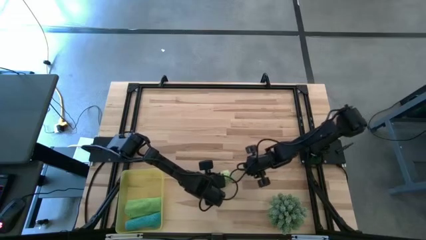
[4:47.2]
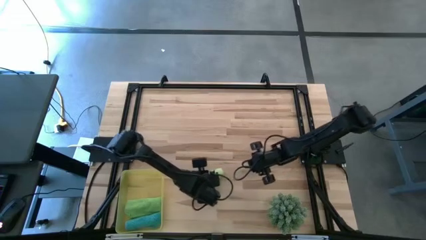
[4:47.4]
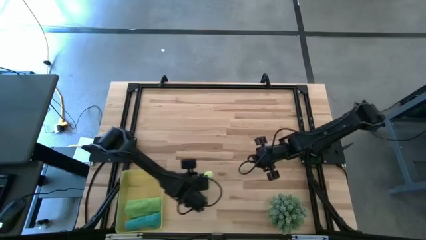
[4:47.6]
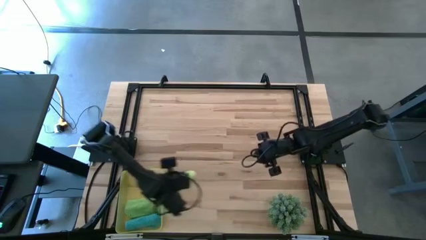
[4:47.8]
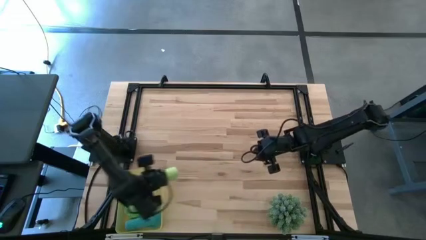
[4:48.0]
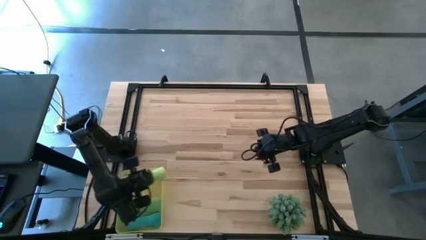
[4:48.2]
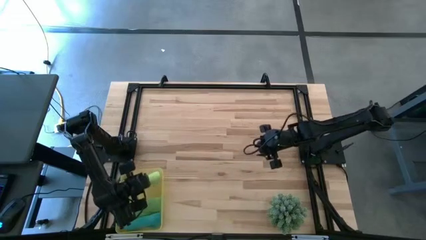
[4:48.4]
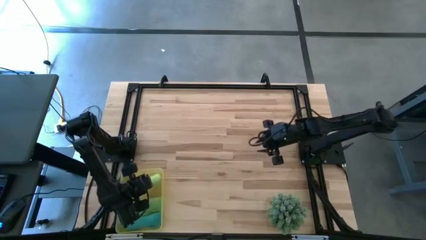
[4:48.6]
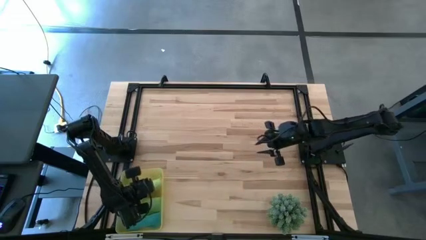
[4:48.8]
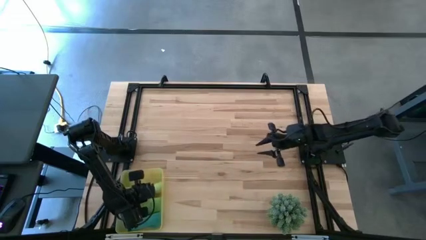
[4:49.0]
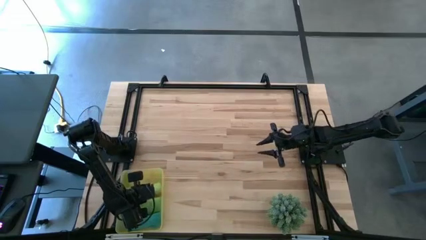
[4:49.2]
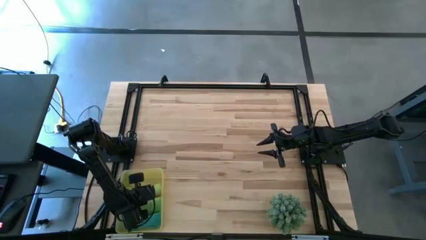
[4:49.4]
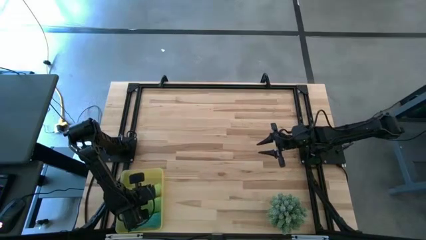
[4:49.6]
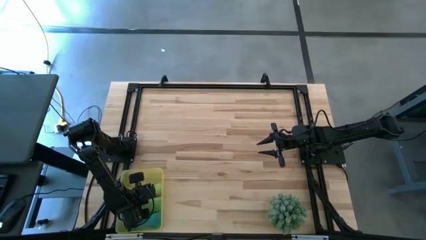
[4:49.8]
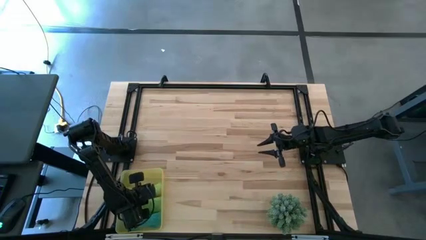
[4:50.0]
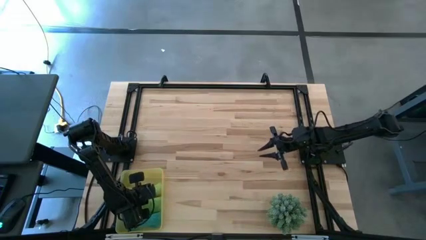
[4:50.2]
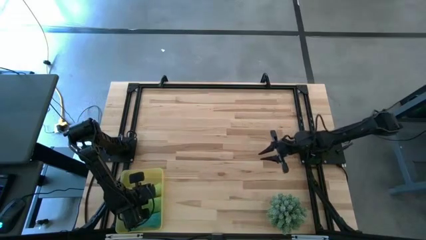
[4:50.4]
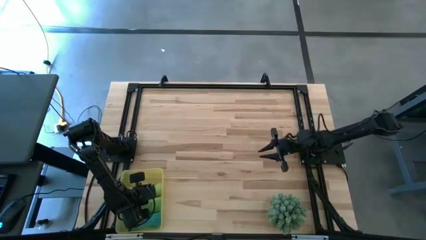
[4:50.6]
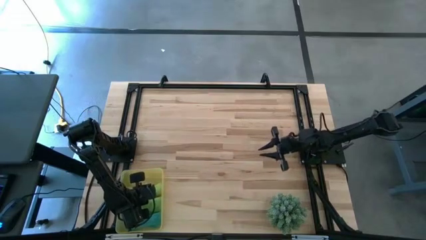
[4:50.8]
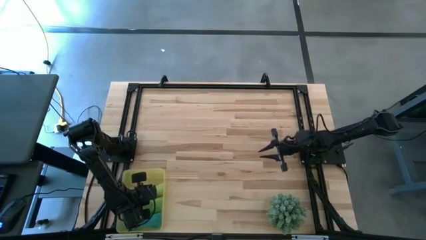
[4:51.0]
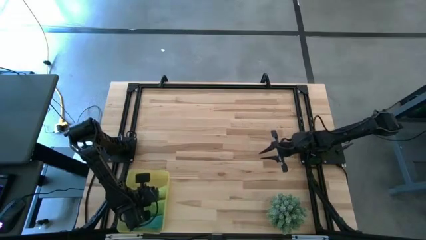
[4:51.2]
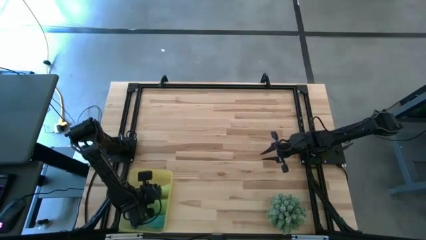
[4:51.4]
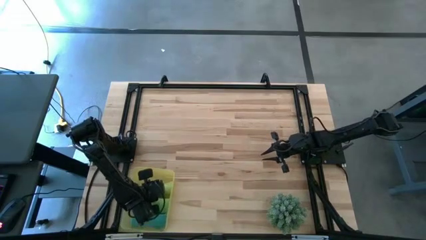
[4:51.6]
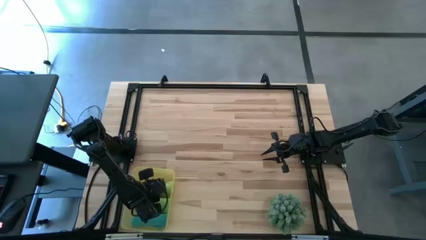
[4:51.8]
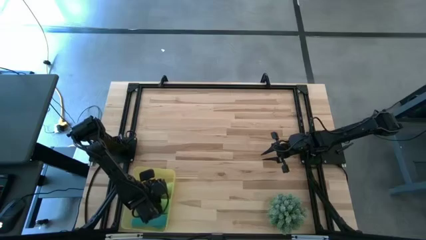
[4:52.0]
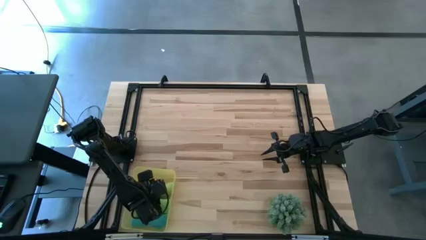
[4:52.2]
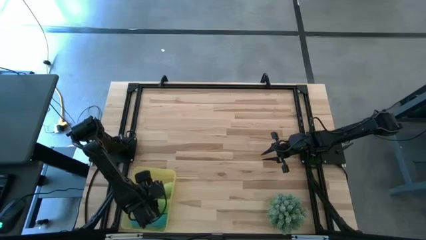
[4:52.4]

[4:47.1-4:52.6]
Task: Roll microfiber towels into tight, uniform cylinder then place into a basket
Put the light green microfiber towel into the yellow bin

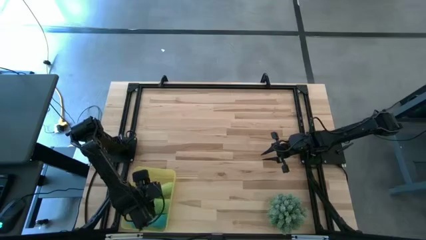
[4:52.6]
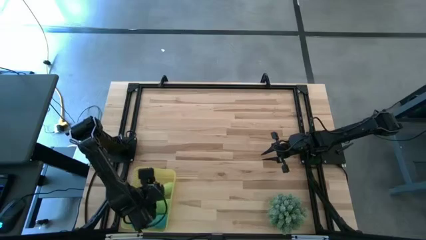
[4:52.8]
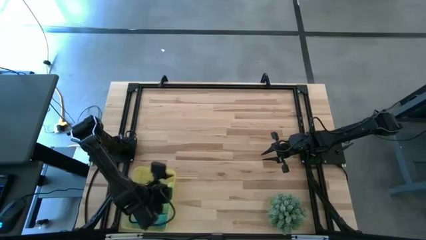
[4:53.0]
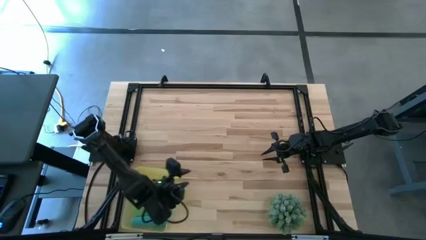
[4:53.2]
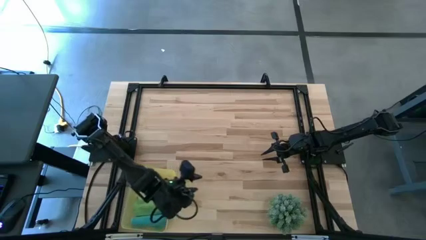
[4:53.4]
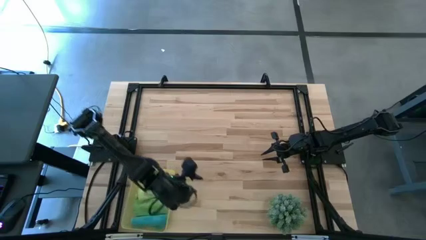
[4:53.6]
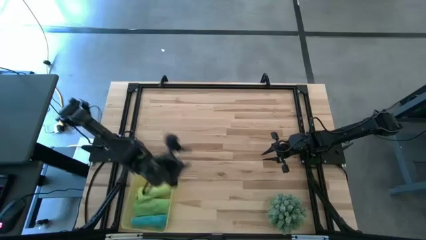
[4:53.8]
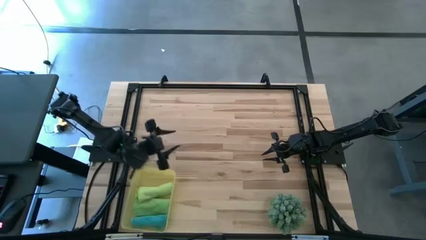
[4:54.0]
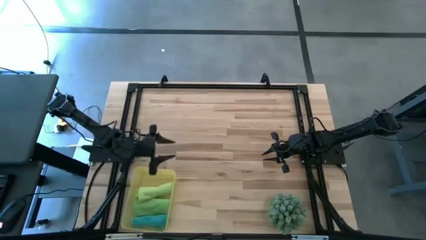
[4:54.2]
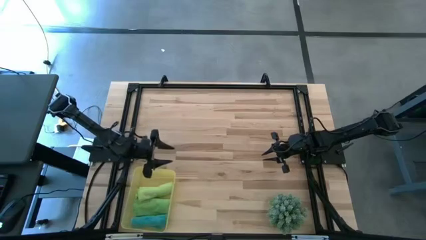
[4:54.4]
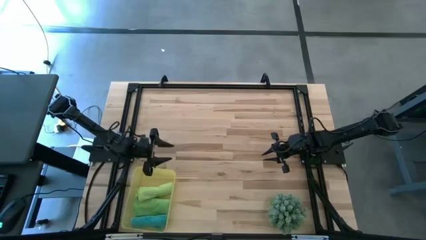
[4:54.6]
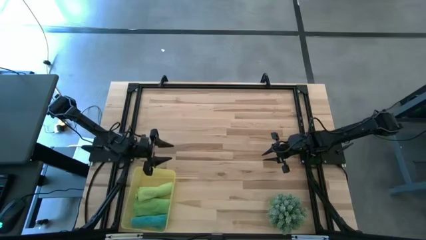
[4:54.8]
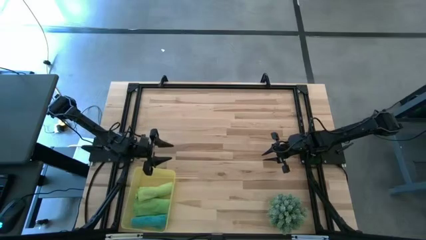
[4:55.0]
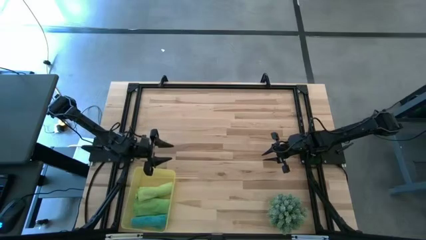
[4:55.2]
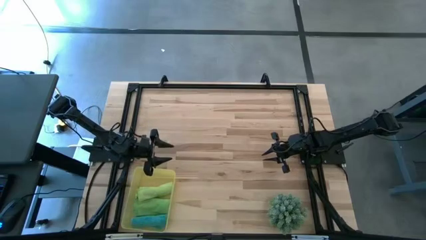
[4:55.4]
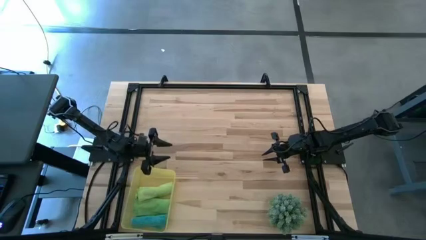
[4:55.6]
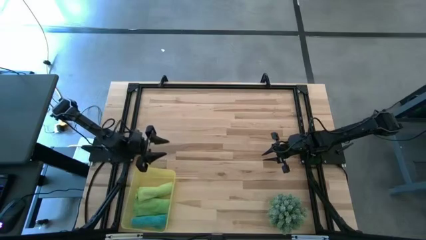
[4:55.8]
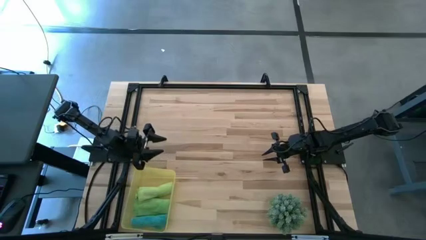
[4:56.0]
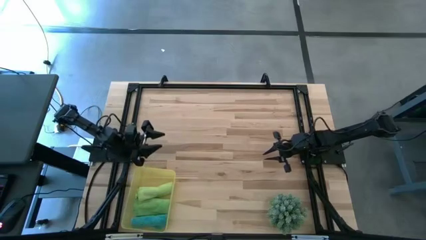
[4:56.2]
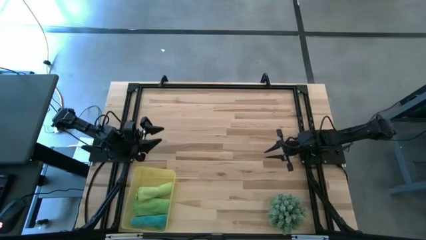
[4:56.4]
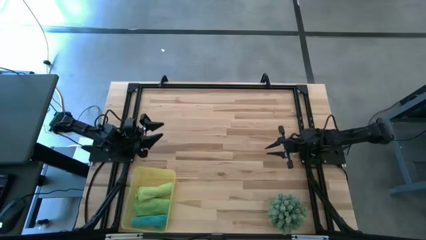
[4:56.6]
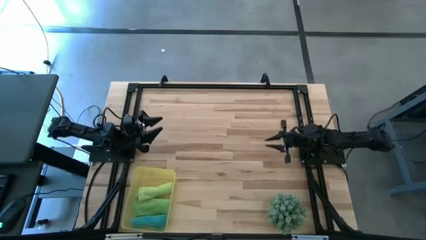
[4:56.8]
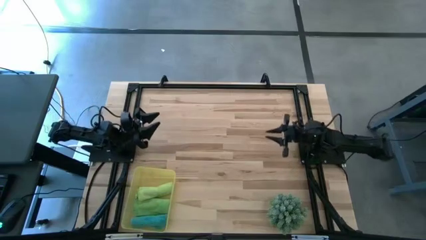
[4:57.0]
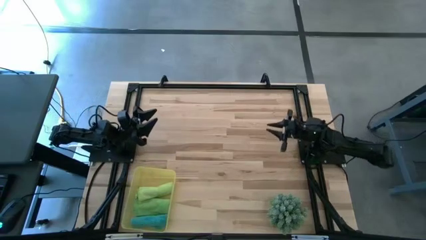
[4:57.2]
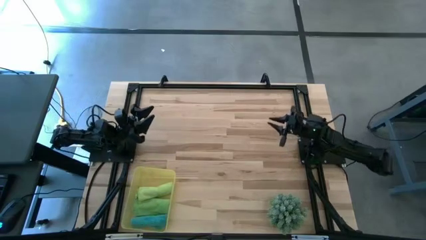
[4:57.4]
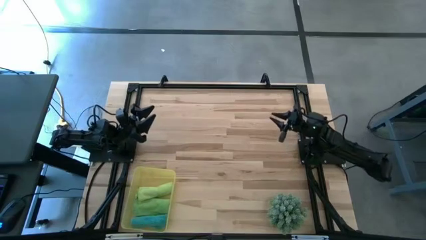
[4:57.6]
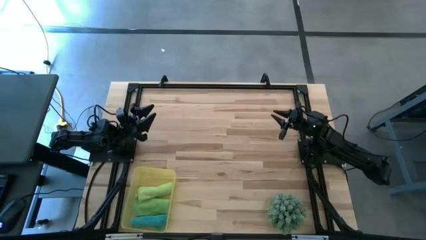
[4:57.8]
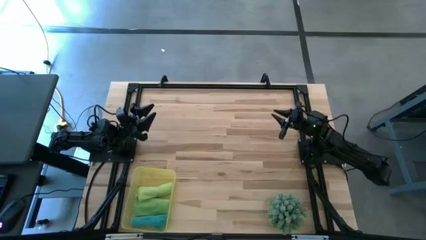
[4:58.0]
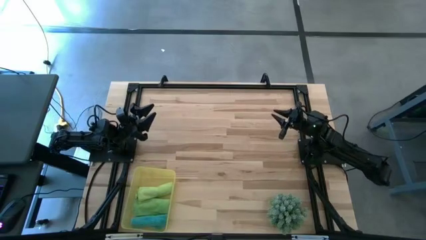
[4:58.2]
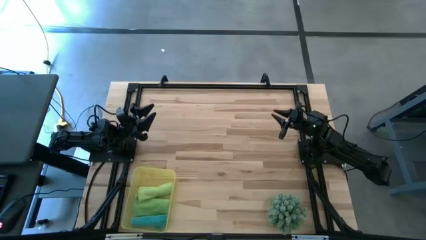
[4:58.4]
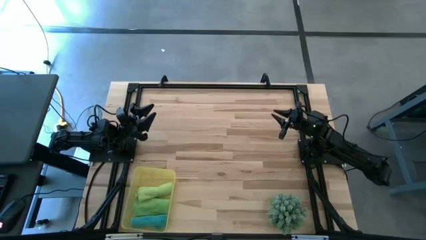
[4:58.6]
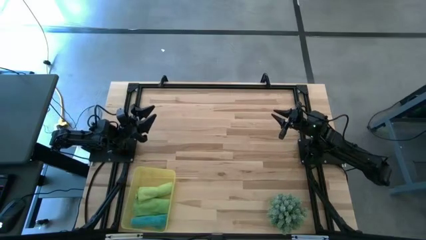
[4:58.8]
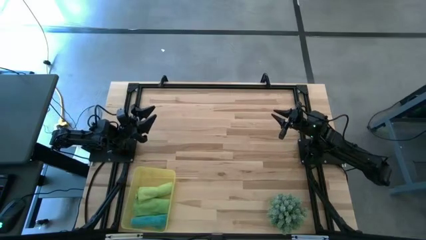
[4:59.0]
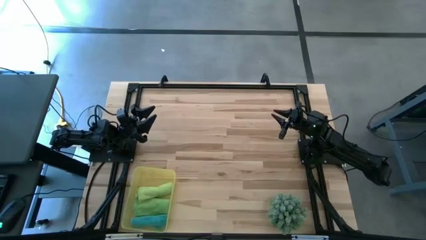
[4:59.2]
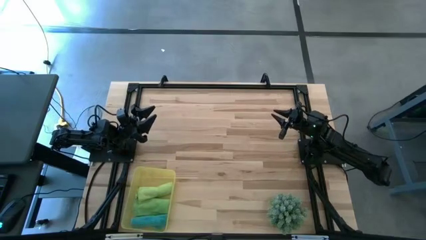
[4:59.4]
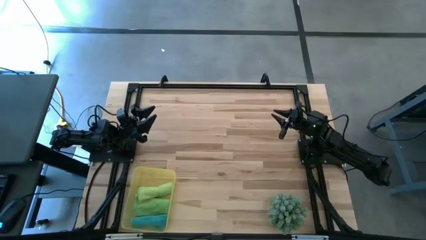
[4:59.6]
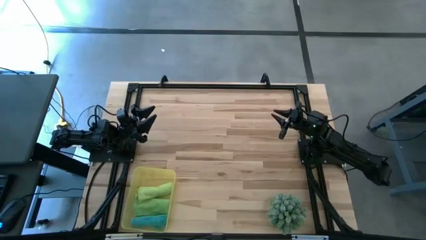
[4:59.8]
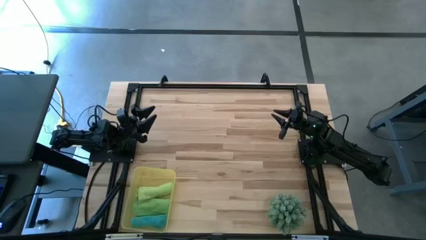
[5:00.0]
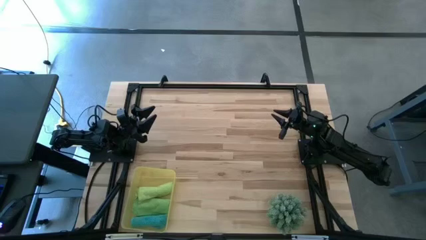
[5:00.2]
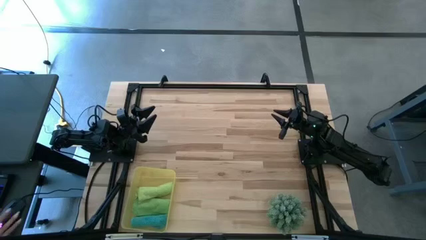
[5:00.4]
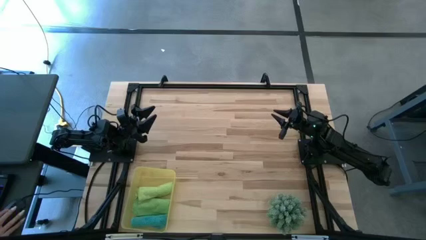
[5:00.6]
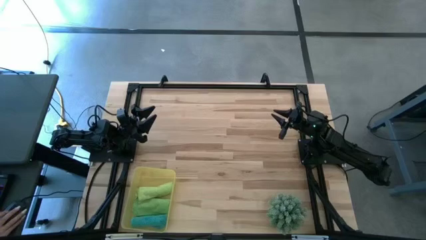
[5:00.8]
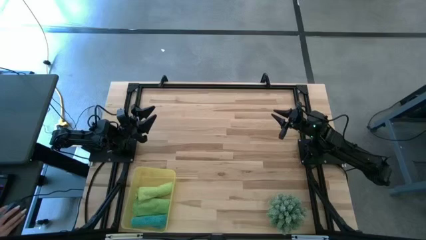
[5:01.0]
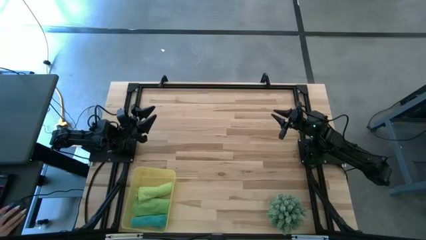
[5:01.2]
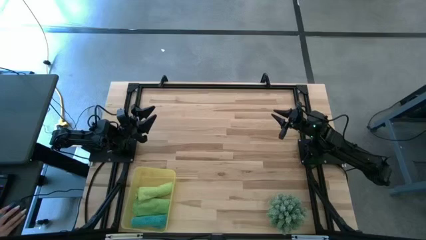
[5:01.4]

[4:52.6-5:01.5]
Return to Home Position
